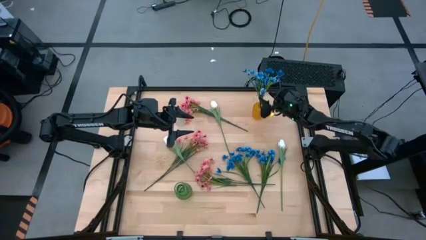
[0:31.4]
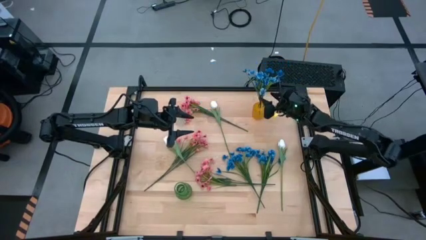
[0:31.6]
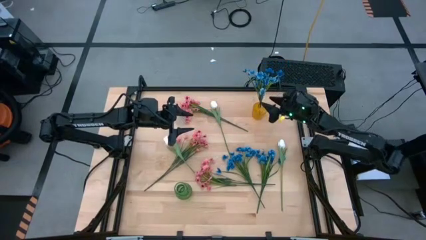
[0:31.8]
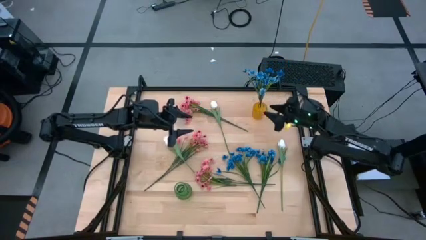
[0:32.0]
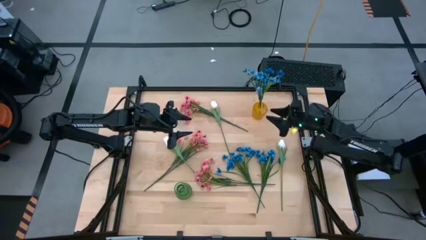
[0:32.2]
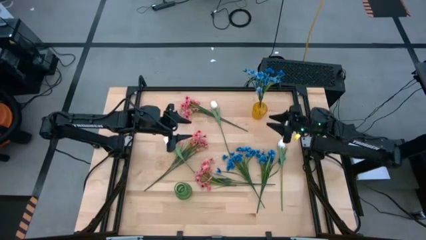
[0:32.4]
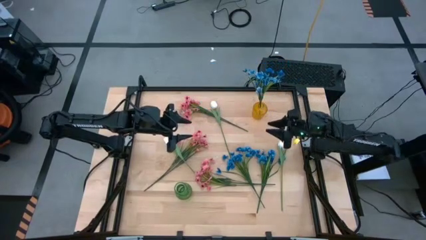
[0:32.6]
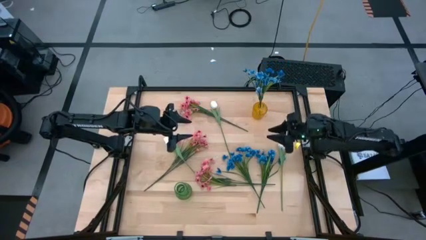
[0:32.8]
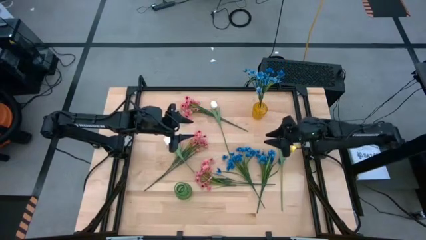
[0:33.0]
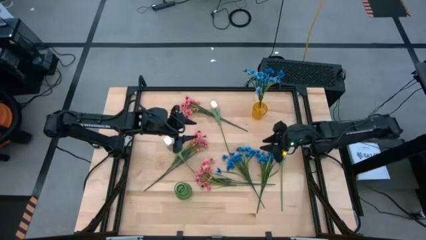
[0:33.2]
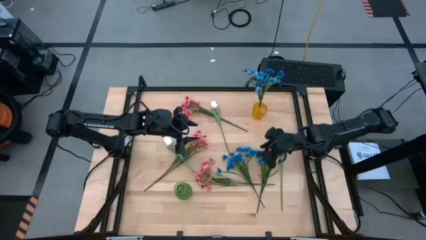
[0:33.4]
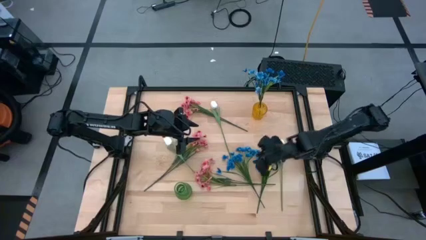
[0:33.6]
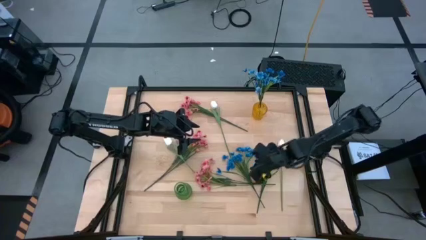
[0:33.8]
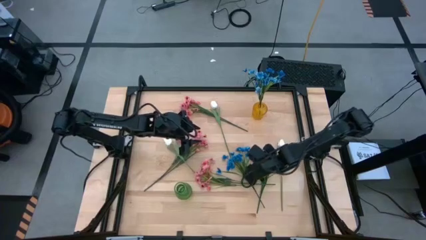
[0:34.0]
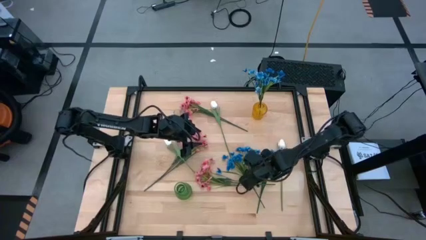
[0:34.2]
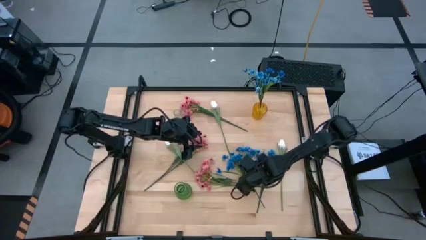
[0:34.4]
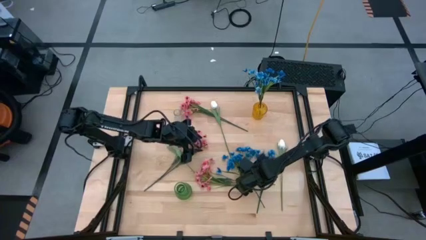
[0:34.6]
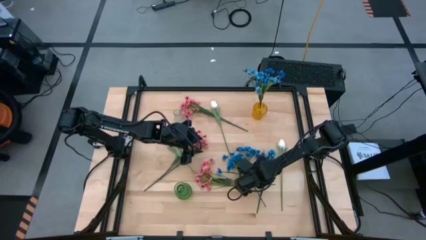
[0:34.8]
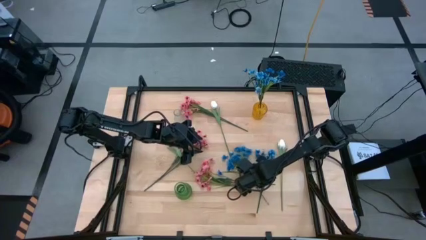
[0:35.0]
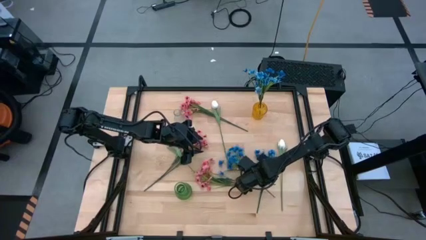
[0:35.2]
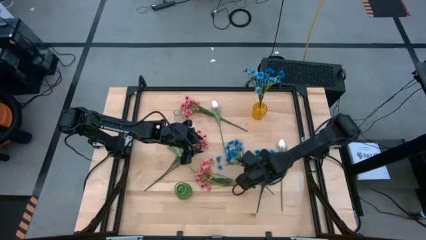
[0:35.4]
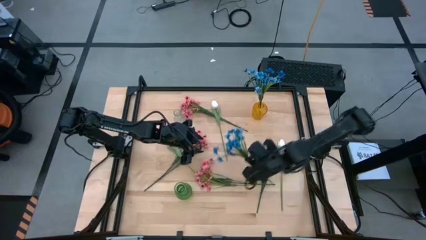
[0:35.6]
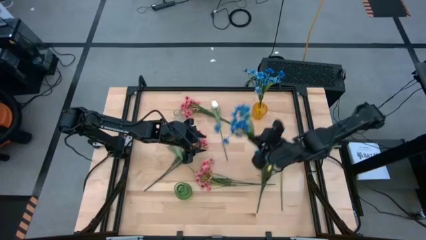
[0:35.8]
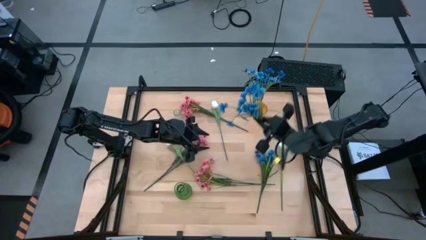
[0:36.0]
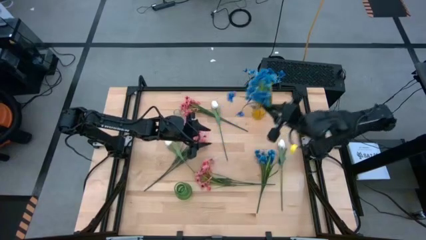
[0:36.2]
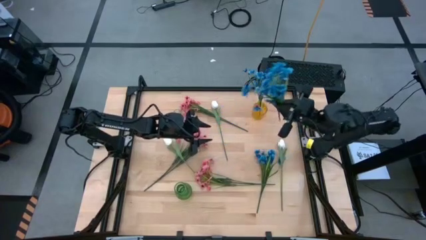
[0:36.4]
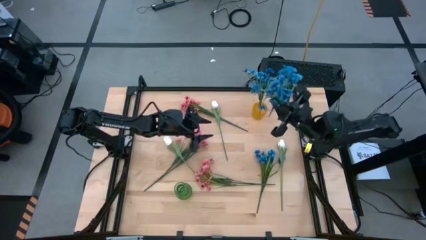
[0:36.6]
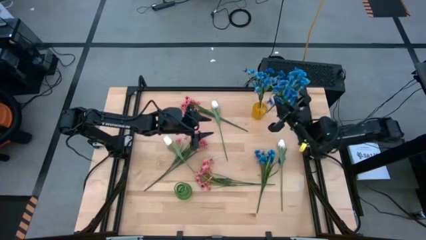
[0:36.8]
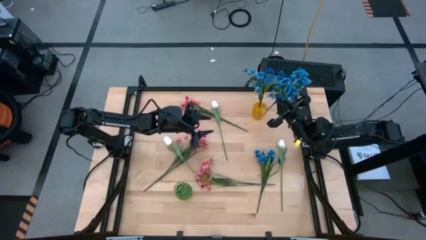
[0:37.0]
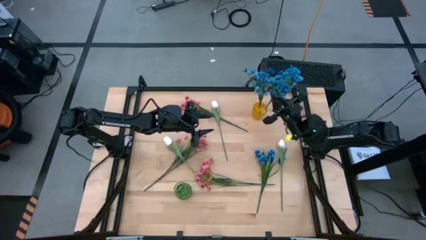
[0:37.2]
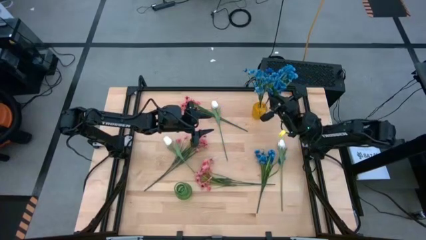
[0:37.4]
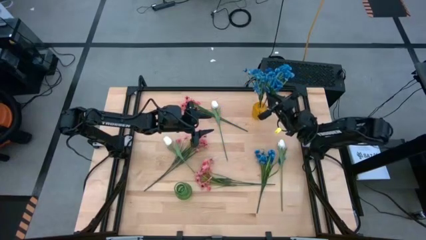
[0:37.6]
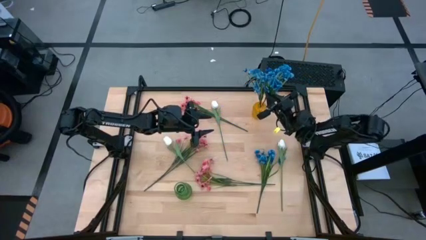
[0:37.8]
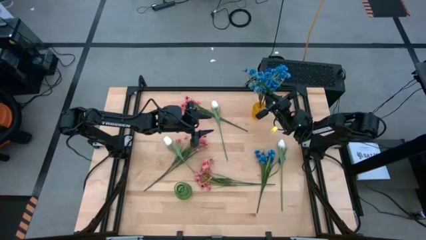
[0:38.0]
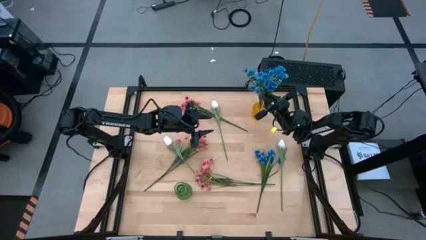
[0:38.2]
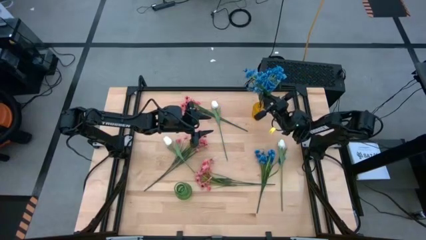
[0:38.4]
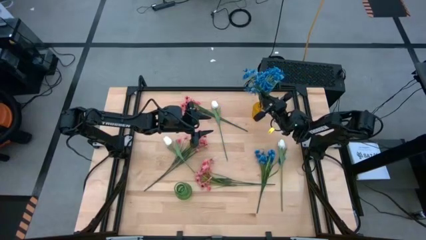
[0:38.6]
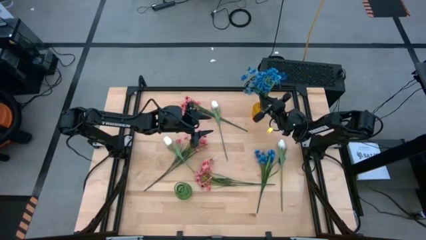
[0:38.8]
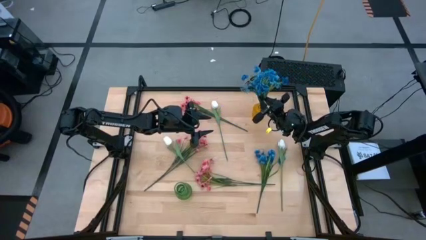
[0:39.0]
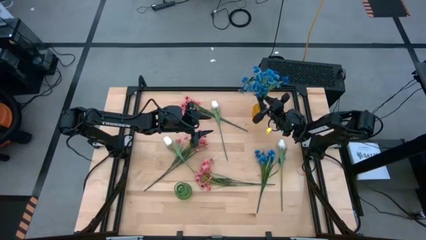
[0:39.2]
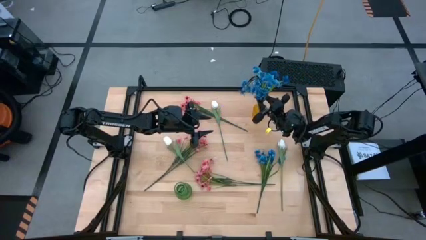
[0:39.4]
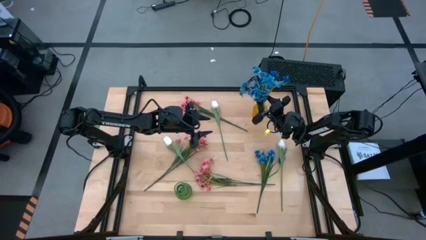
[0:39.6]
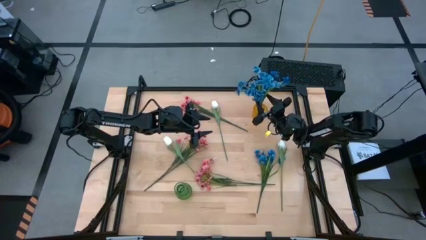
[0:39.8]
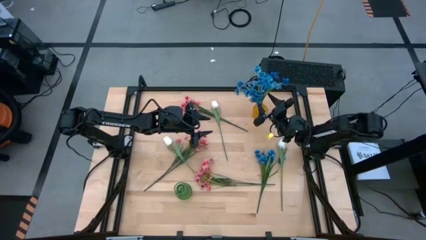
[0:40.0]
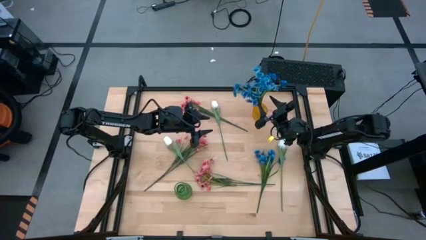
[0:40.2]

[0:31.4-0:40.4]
Task: Sort flowers into vase by color
Put the left blue flowers into the yellow vase

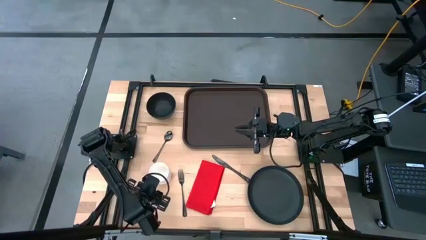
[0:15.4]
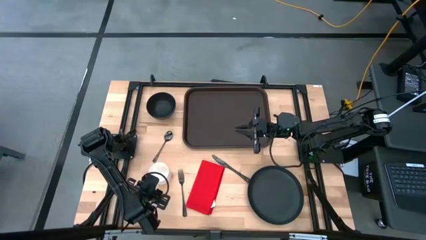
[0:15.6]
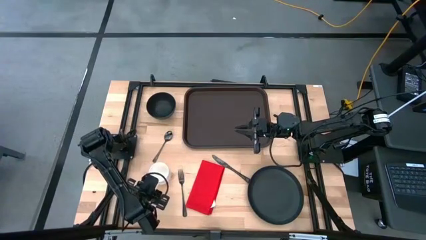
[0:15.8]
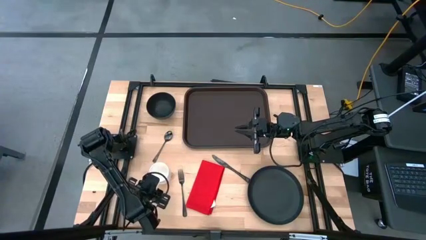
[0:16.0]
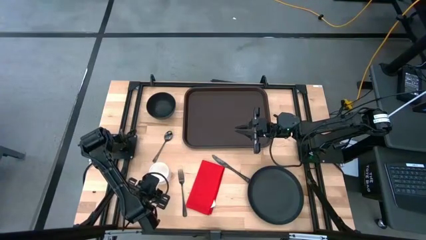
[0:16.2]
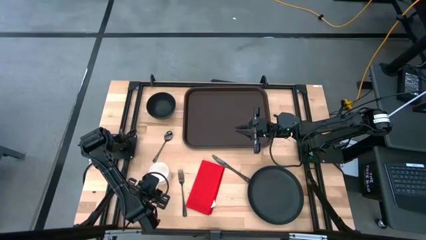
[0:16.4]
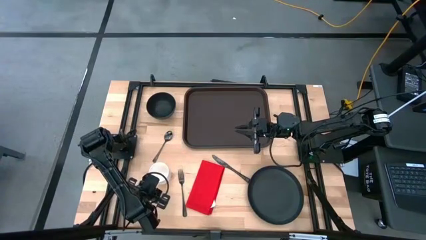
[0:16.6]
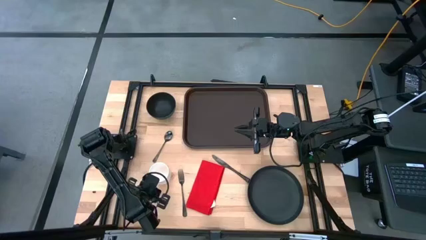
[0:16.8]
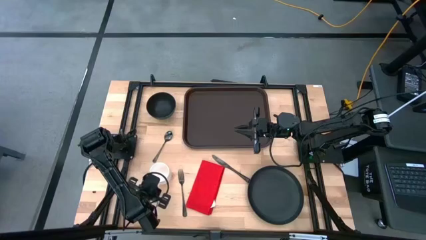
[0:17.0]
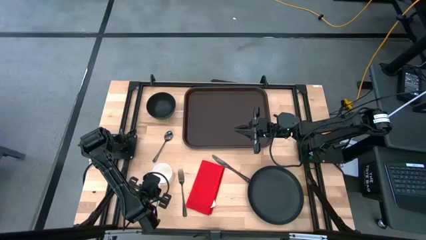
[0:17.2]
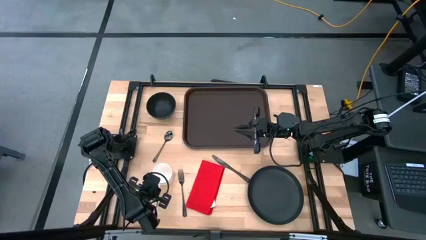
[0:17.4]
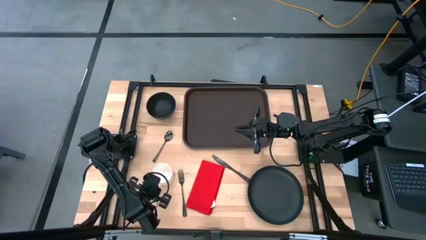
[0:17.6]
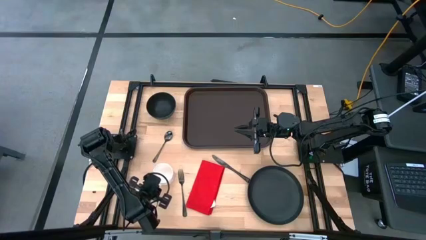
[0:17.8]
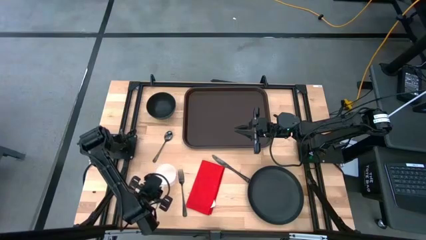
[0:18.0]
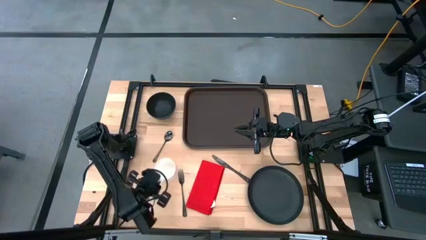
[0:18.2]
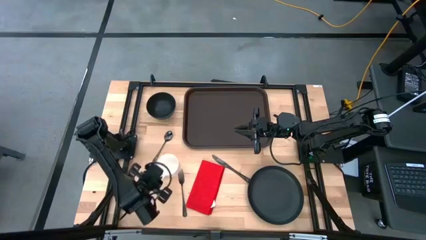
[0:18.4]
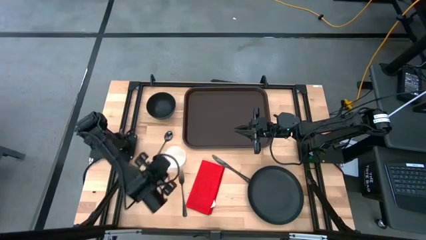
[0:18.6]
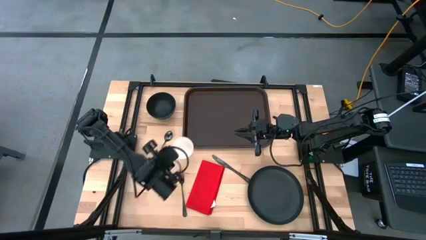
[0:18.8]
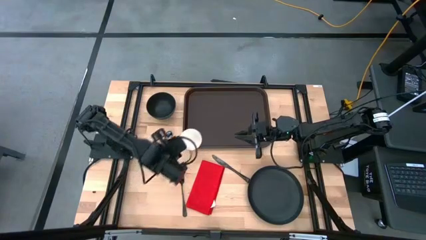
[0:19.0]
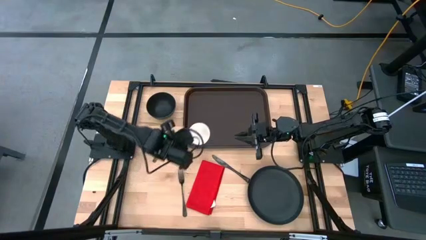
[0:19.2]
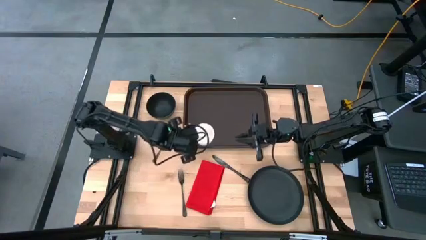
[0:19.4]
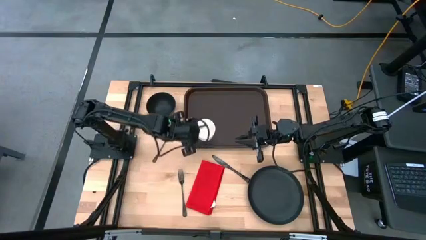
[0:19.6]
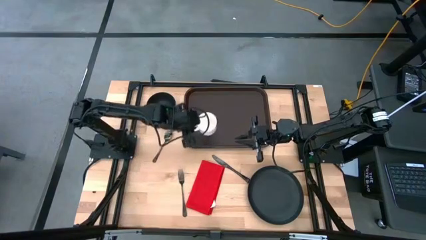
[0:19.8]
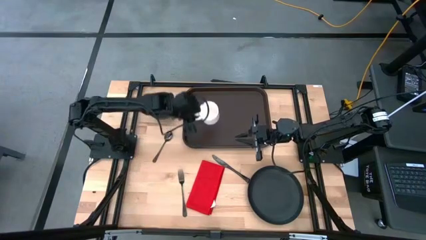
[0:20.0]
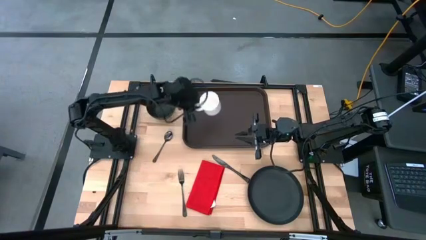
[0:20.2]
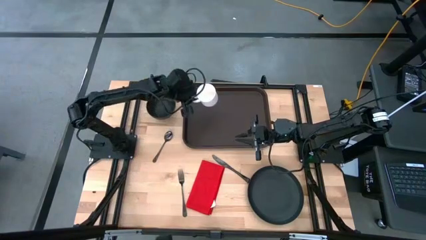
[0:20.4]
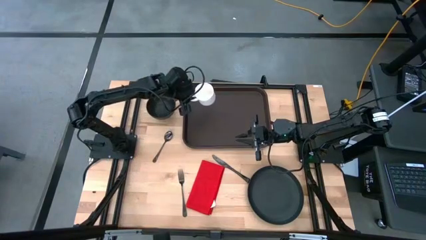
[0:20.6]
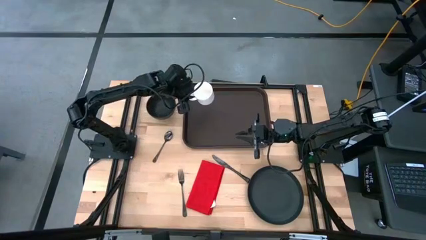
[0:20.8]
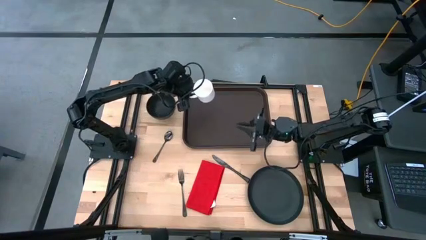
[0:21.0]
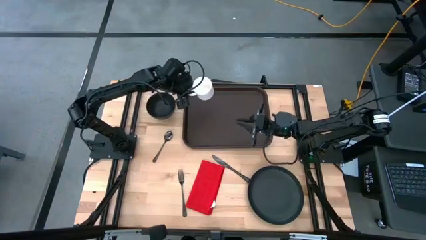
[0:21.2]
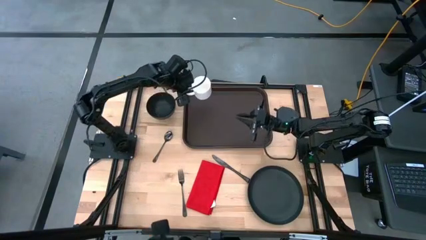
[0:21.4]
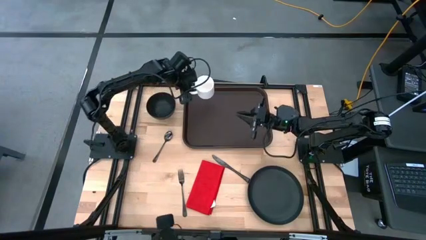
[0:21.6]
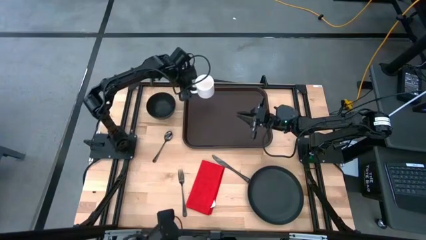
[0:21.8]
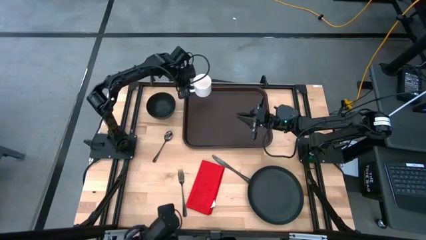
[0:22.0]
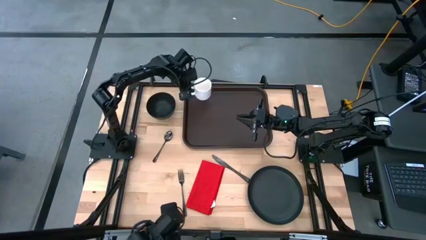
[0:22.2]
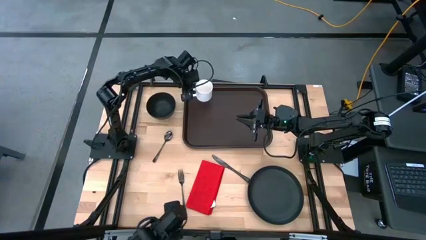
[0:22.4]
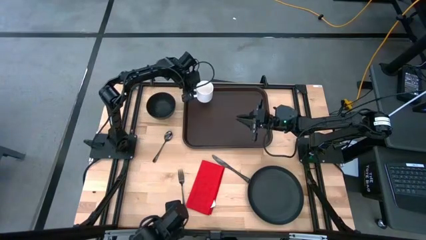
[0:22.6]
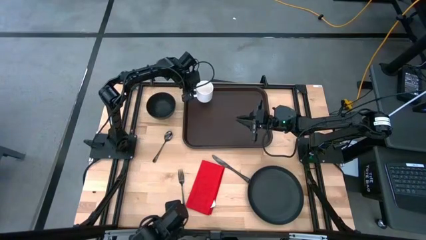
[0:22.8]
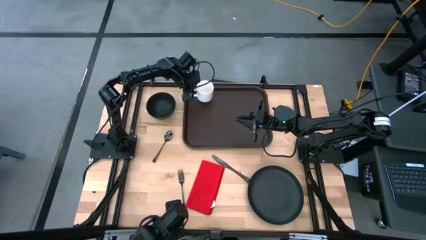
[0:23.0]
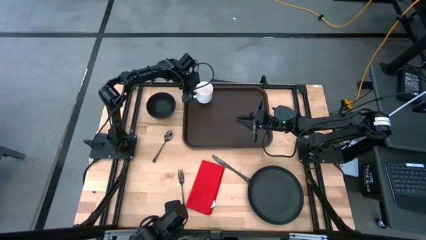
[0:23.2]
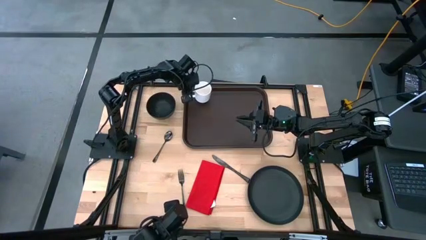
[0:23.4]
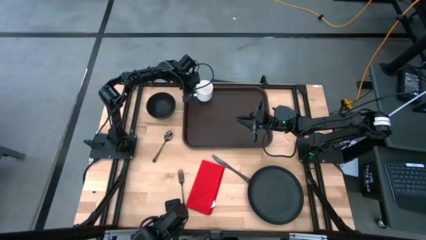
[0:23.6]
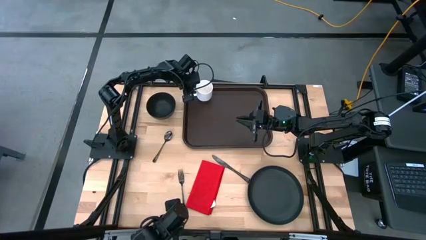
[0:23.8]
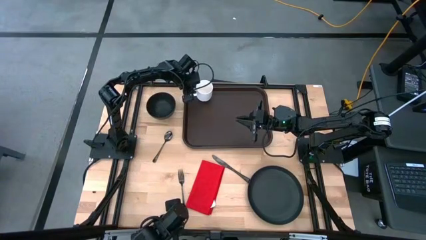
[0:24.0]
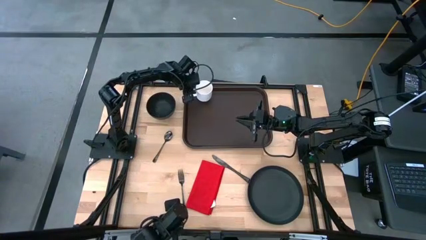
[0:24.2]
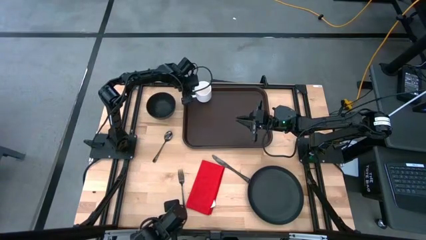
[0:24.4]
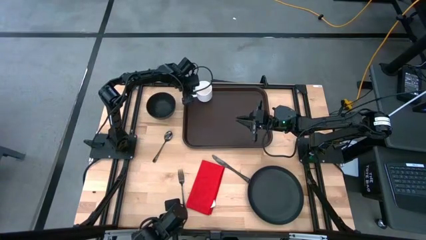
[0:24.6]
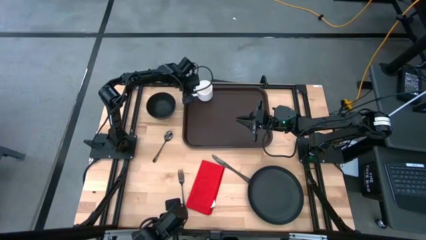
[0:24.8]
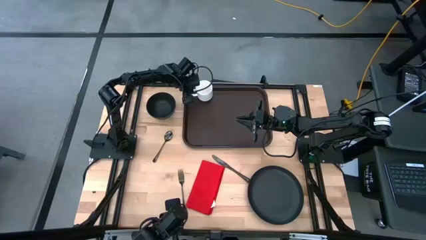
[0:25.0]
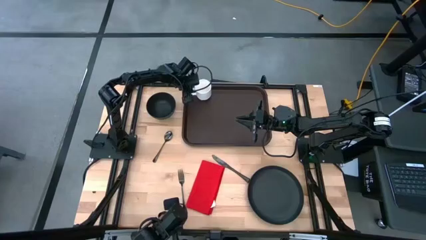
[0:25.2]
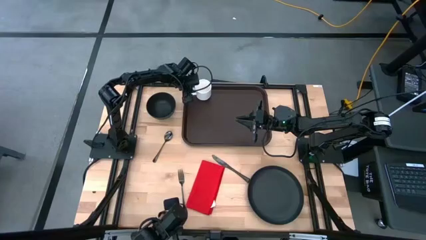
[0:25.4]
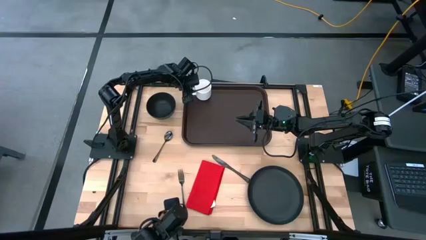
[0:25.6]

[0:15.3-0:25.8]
Task: Set up tray
Put the white cup on the top left of the brown serving tray
